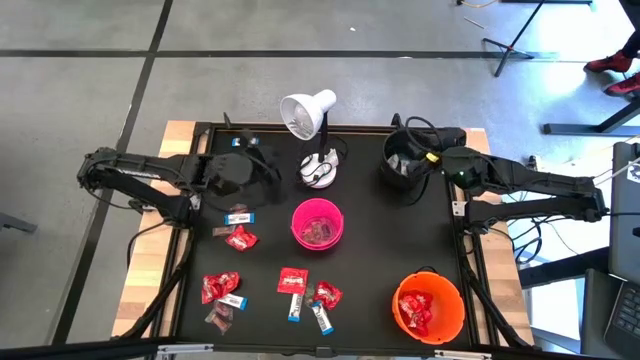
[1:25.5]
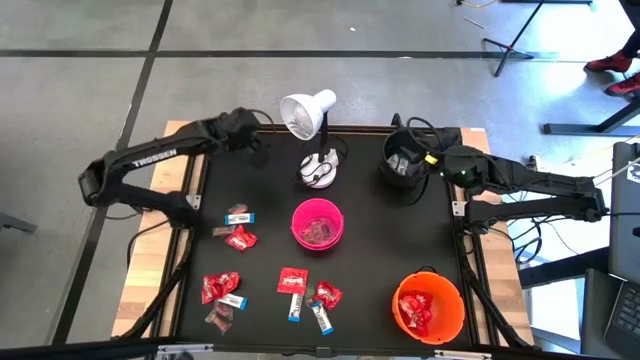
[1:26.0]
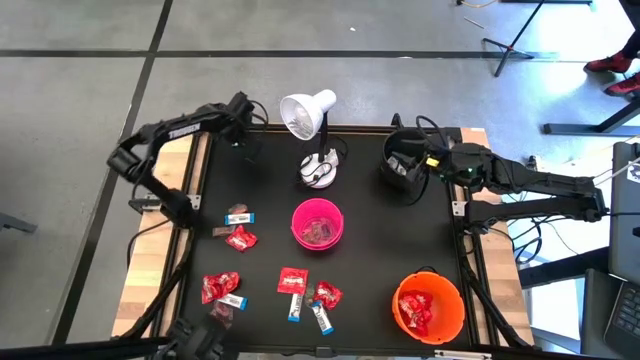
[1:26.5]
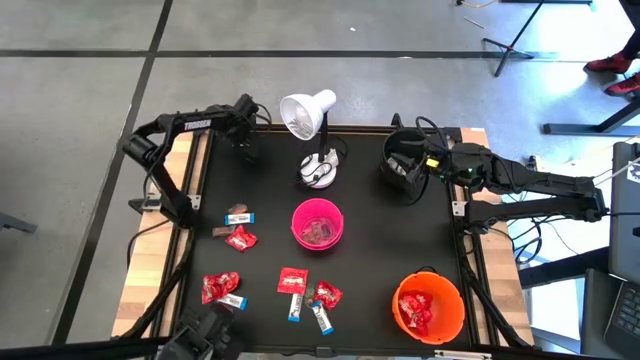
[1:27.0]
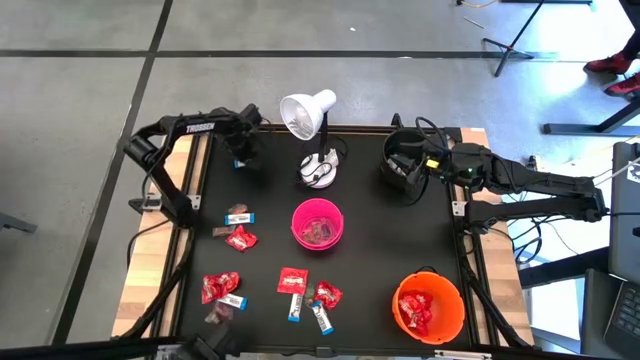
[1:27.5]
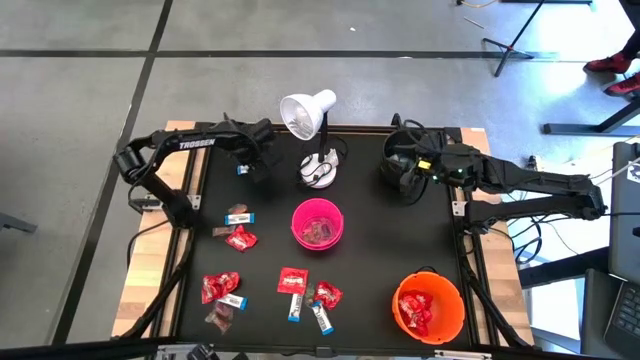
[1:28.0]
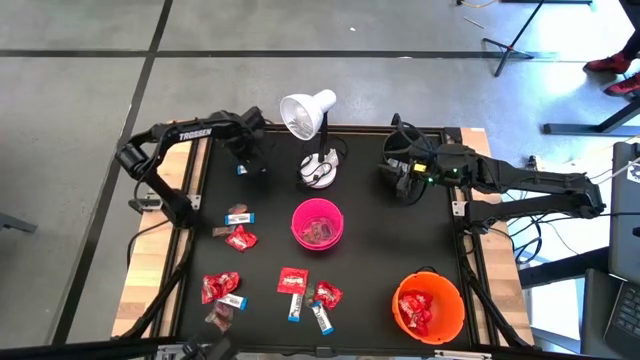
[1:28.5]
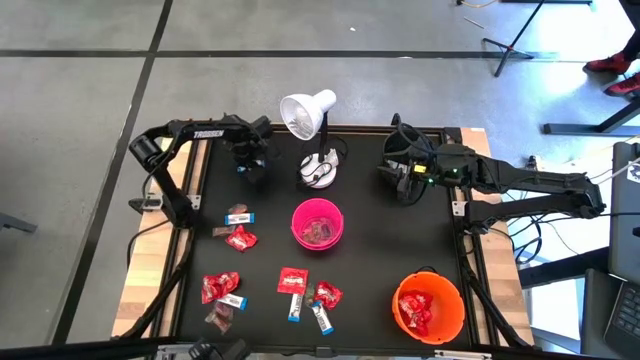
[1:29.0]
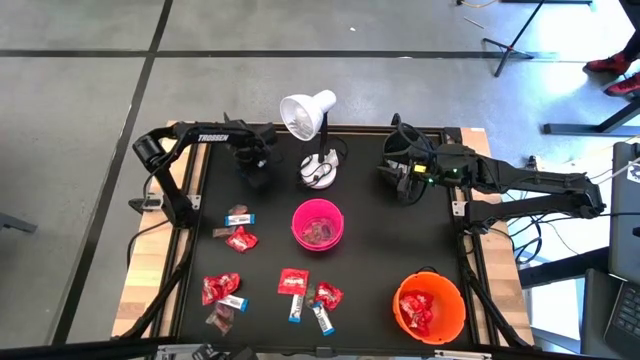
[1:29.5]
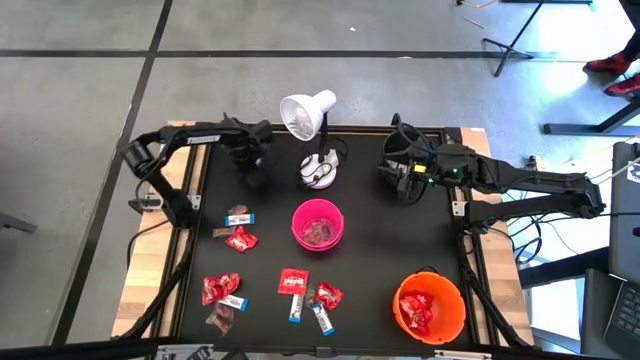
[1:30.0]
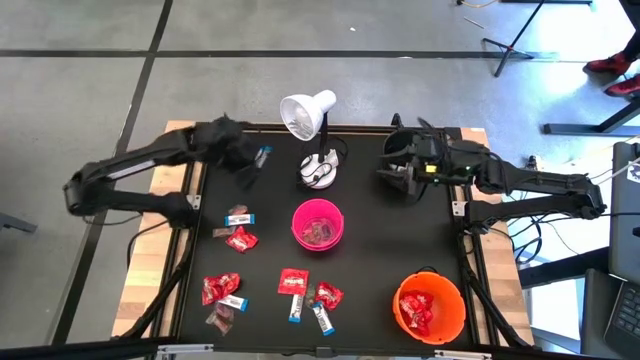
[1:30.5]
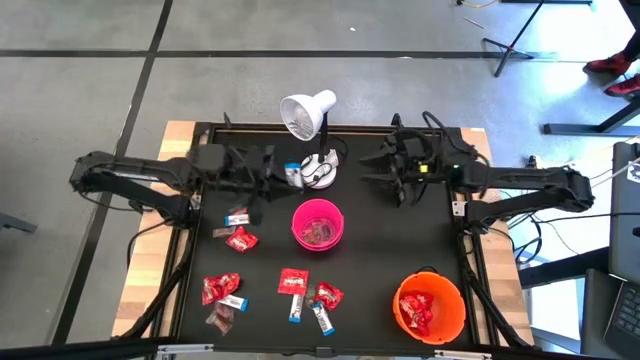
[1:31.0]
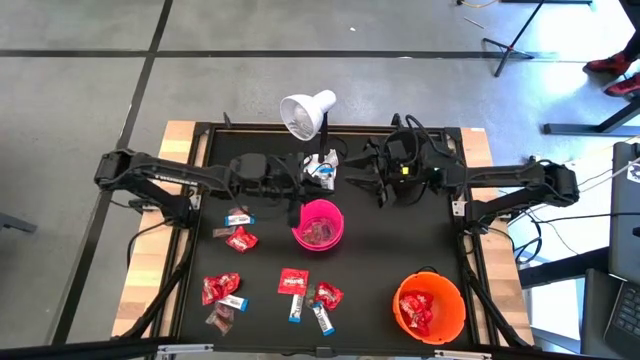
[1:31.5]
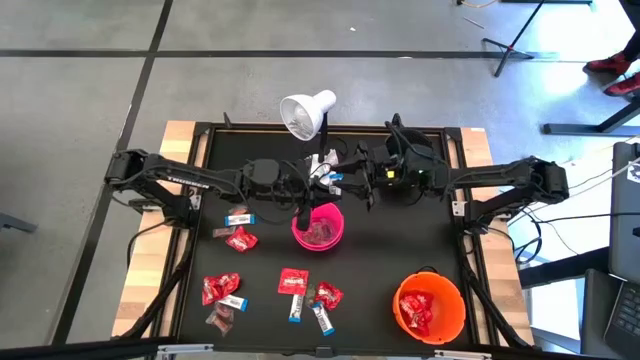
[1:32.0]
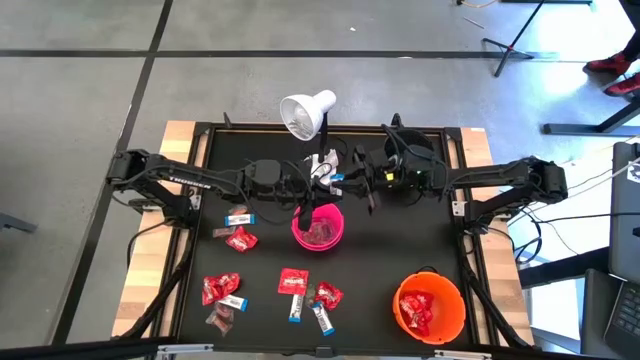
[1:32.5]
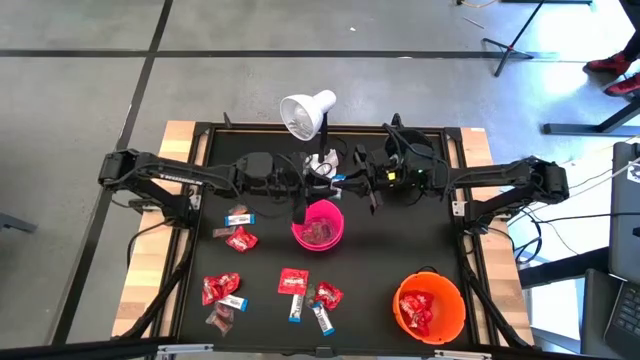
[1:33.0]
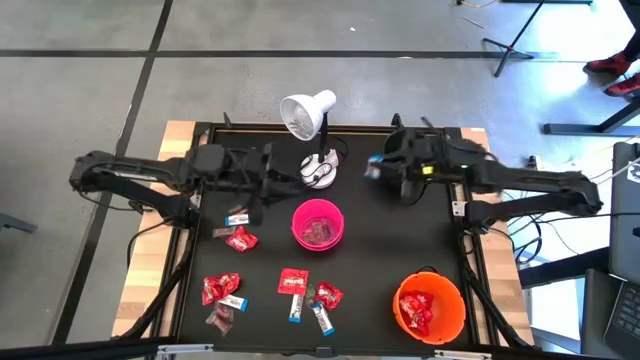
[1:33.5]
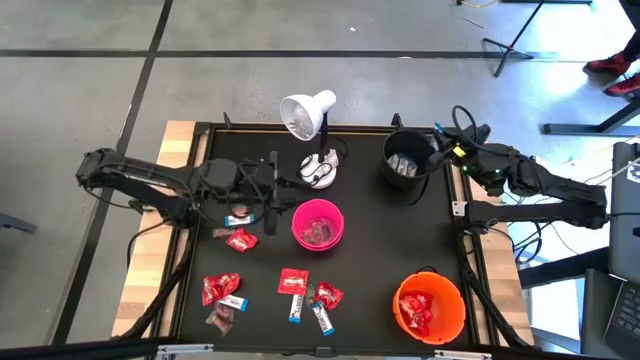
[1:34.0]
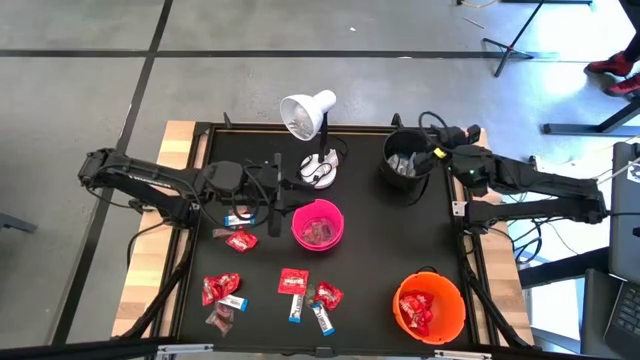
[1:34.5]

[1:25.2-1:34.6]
Task: Sort candy
Put the white chocolate bar into the black bucket

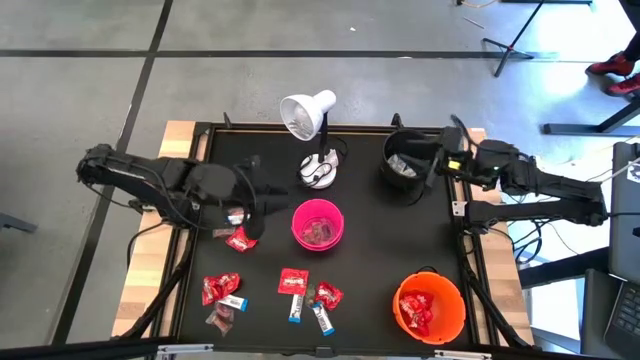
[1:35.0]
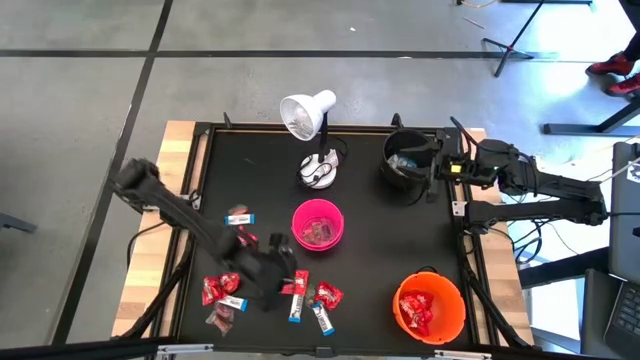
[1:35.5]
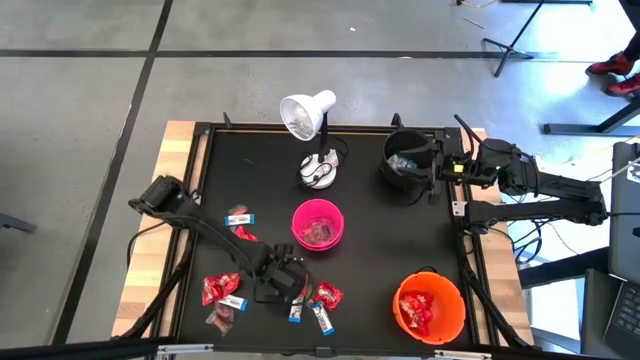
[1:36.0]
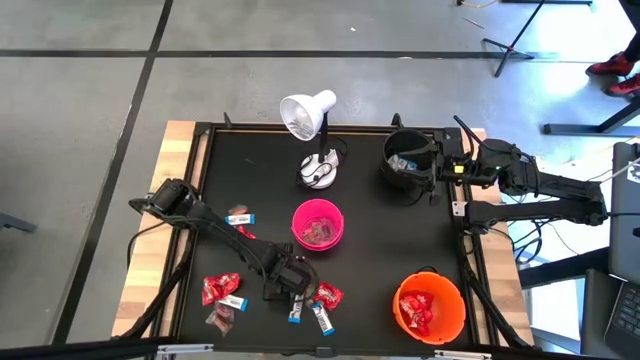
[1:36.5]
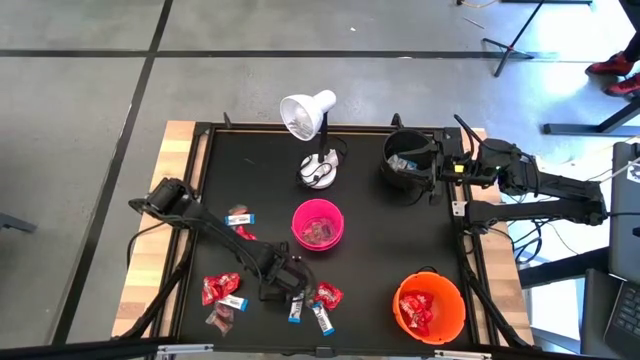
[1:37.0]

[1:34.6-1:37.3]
Put the red candy into the orange bucket

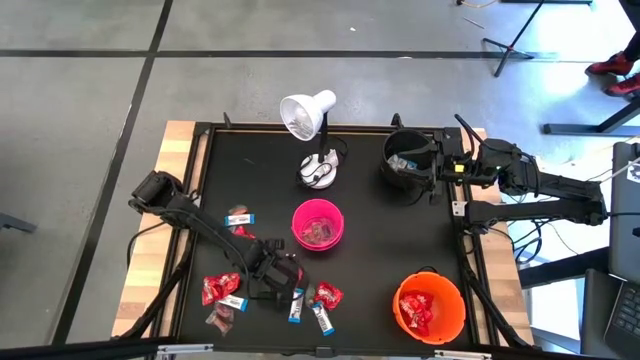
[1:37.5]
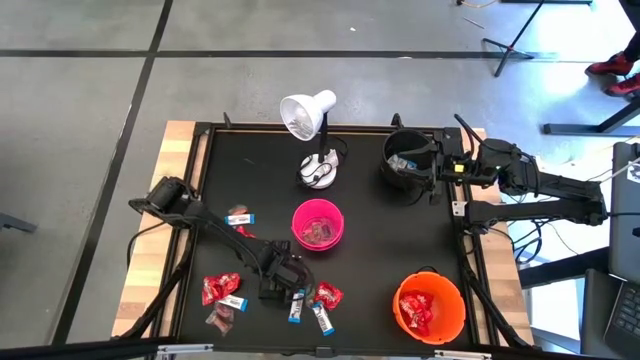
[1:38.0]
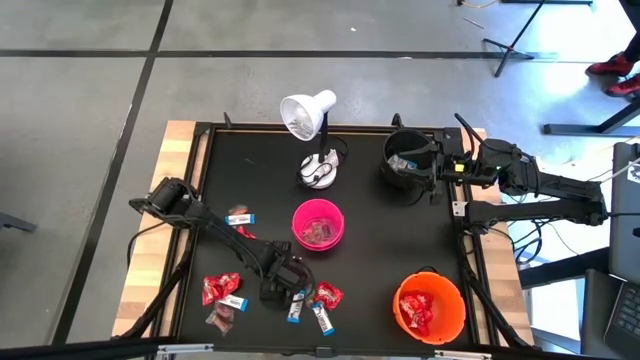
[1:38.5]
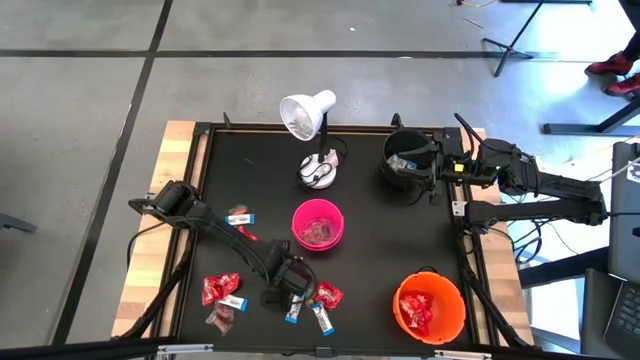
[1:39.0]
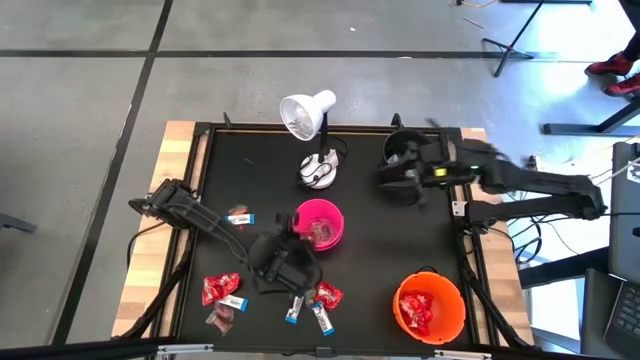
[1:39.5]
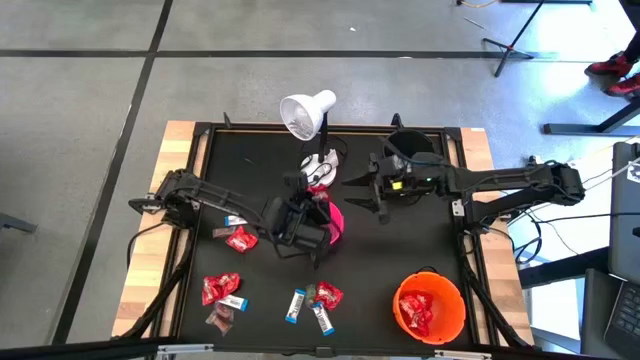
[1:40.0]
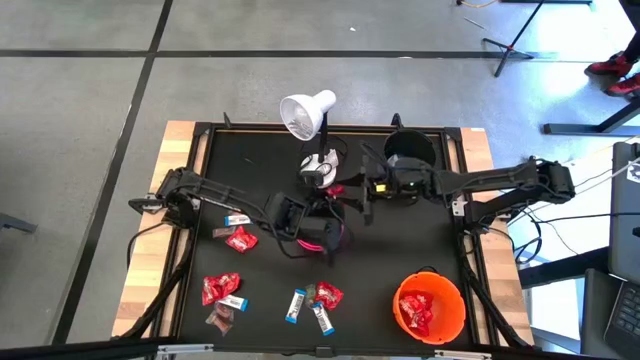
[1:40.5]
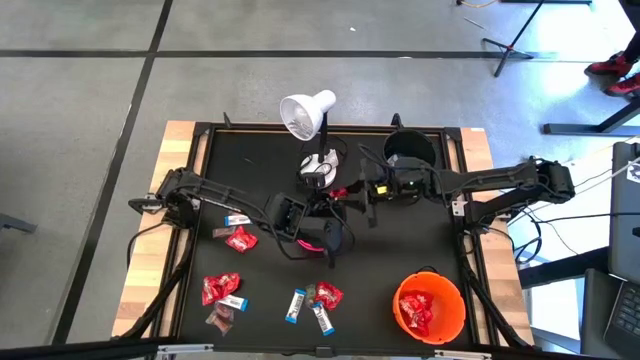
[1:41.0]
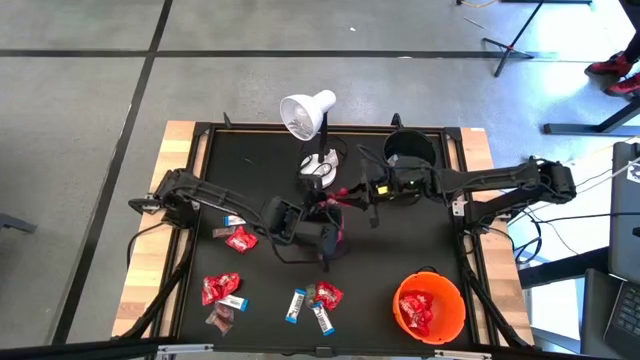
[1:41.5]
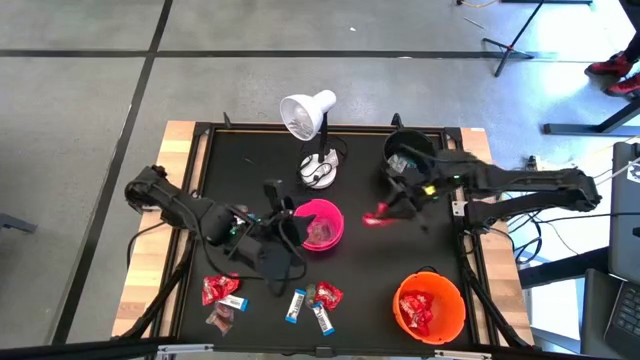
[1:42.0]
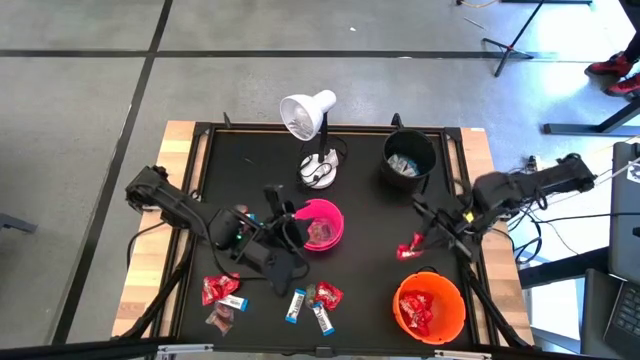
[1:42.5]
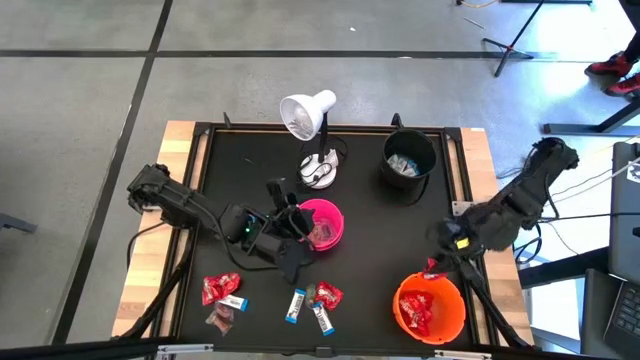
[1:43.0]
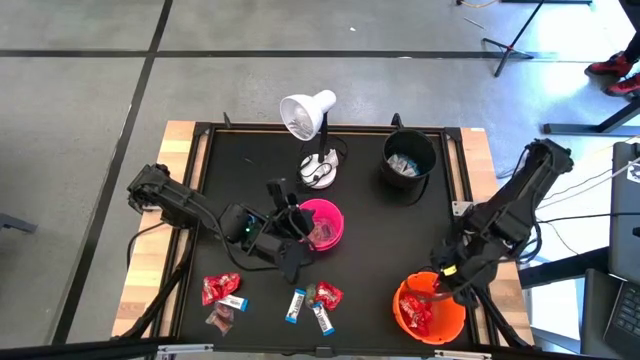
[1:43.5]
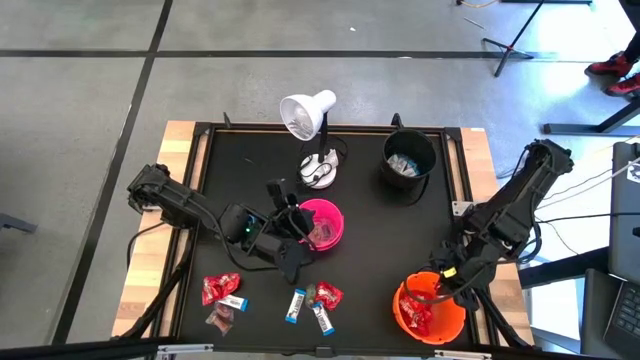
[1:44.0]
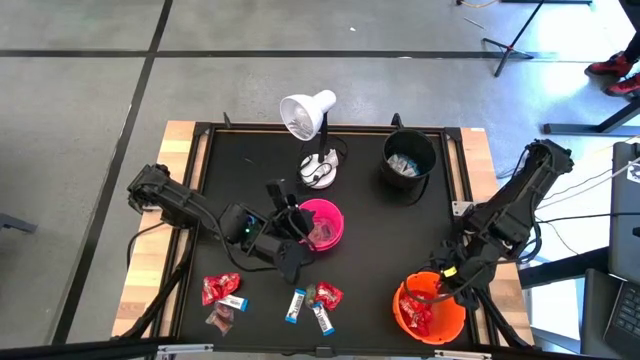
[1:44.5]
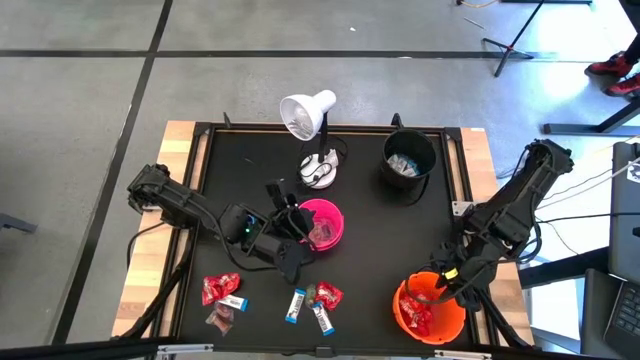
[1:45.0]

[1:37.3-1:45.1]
Put the red candy into the orange bucket

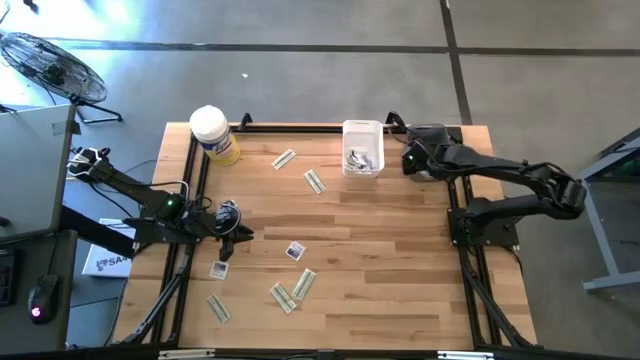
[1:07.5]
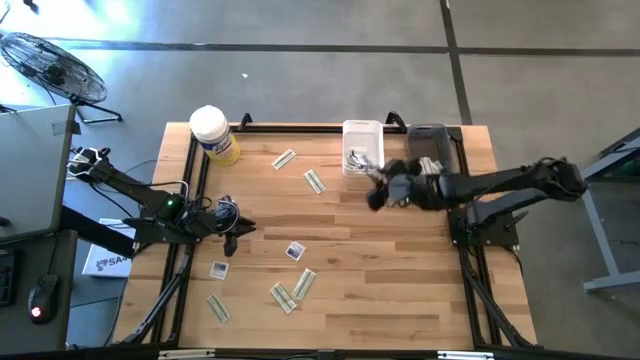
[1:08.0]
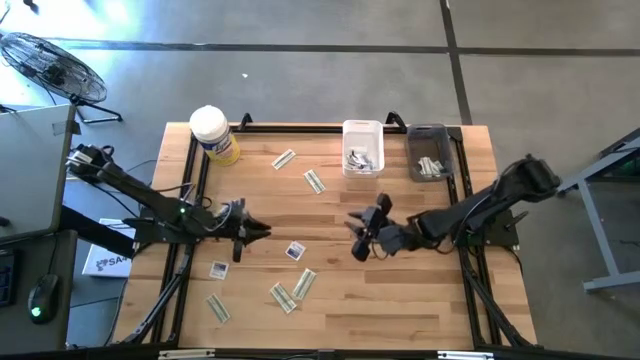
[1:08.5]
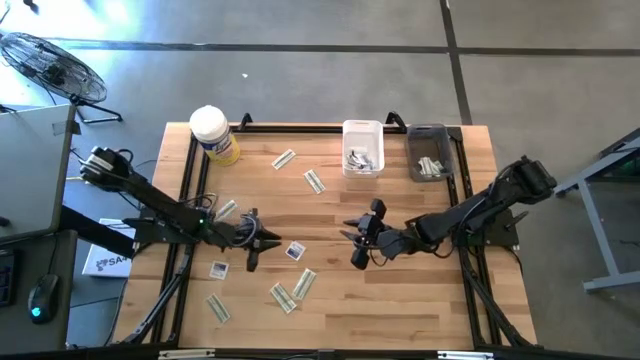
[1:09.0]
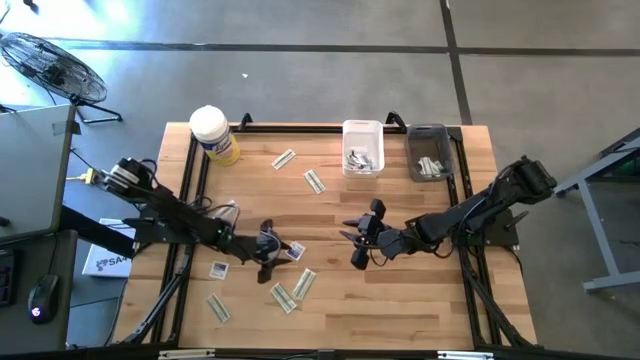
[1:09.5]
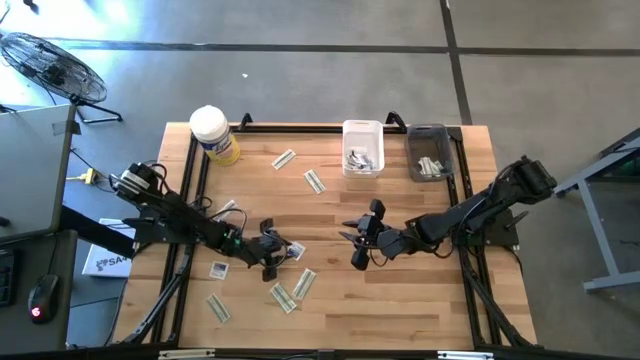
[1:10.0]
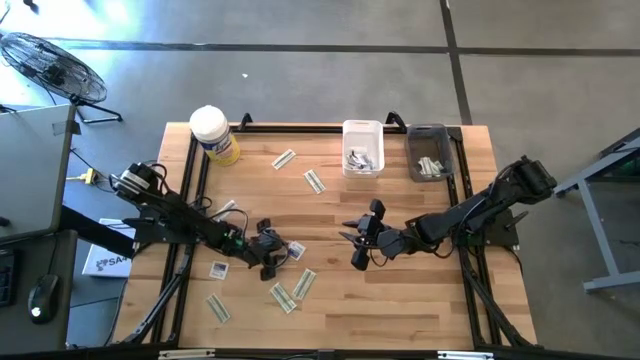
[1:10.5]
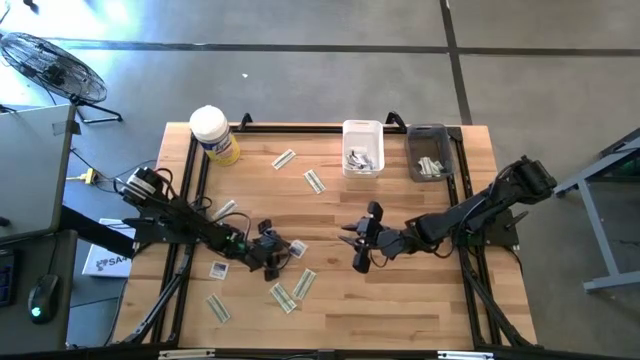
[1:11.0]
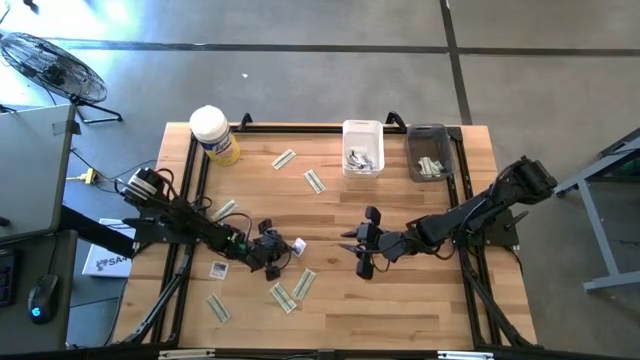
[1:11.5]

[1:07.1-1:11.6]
Task: Pick & Place First Aid Supplies
Put the blue alcohol pad into the white bin
